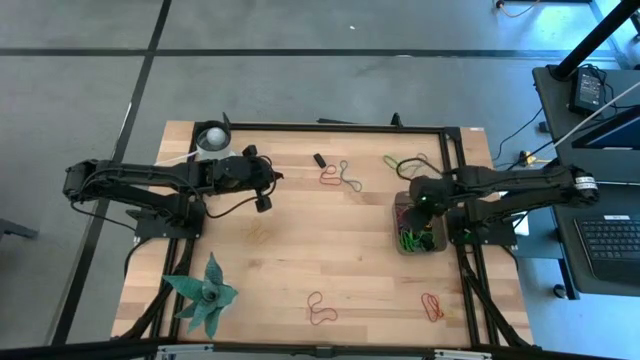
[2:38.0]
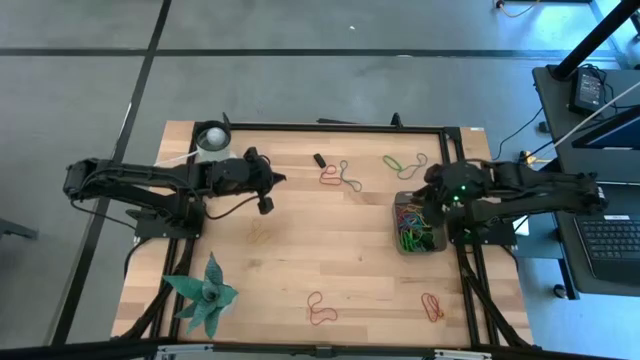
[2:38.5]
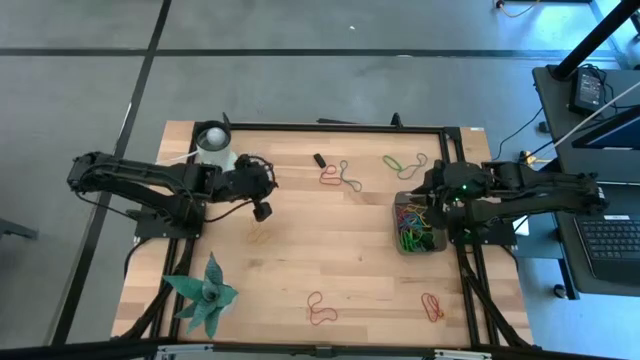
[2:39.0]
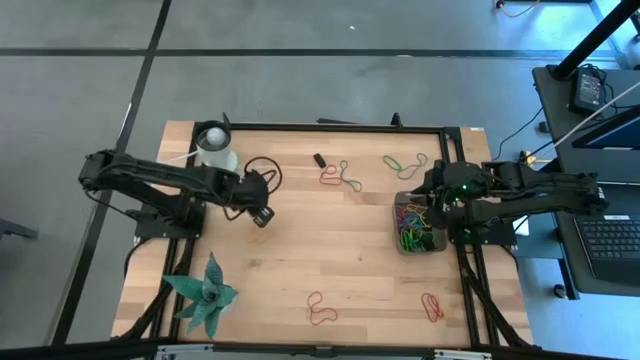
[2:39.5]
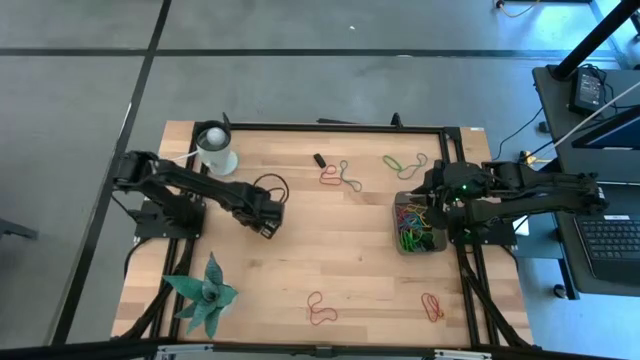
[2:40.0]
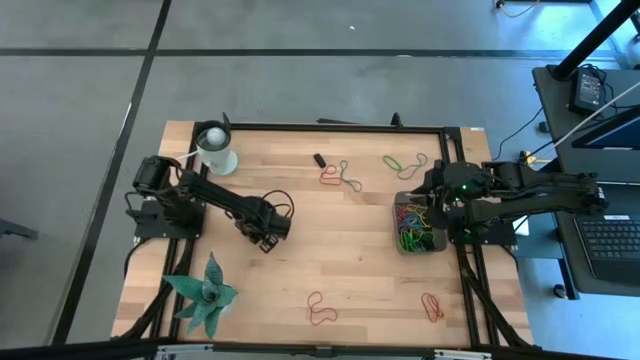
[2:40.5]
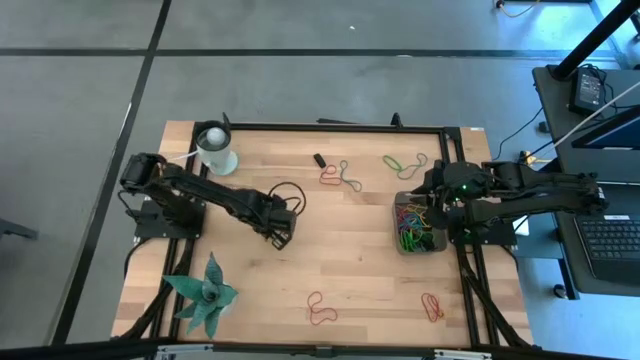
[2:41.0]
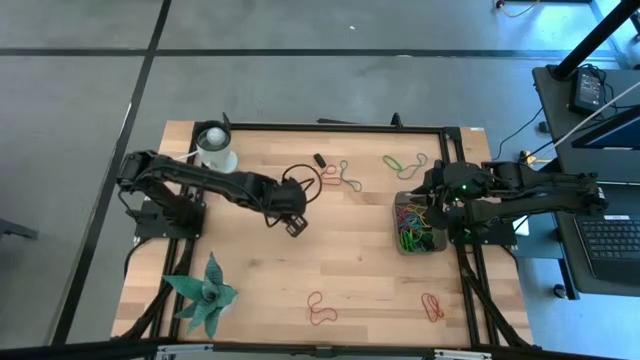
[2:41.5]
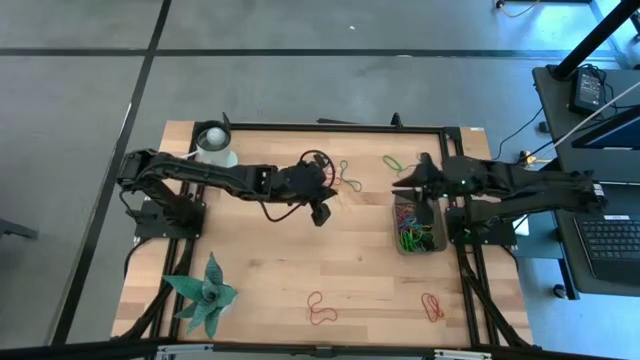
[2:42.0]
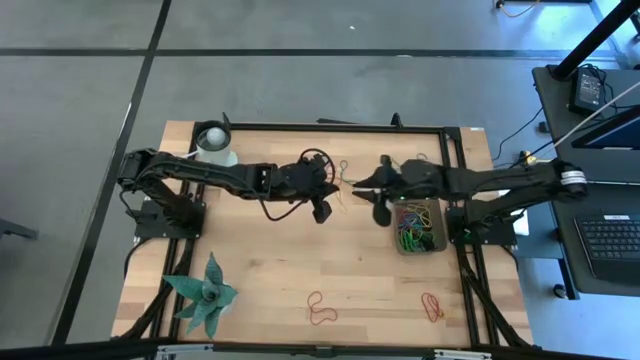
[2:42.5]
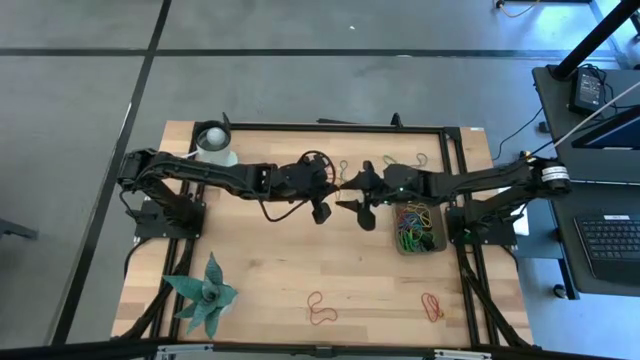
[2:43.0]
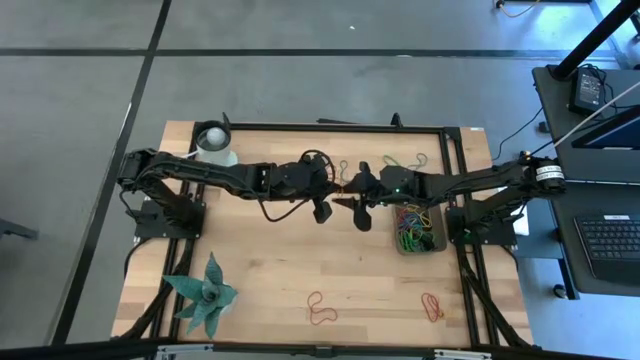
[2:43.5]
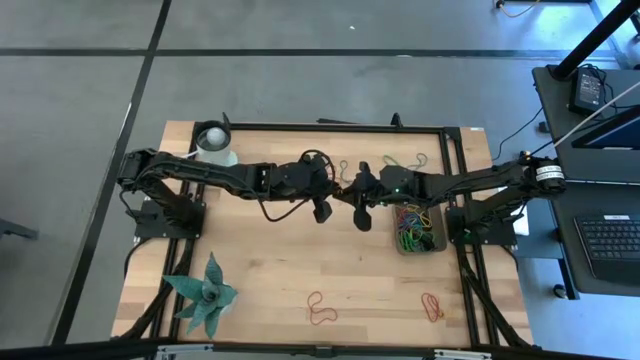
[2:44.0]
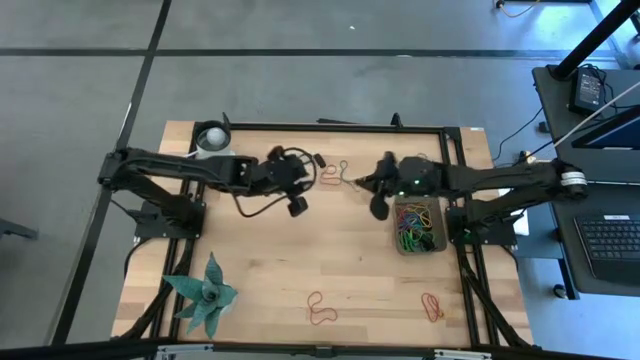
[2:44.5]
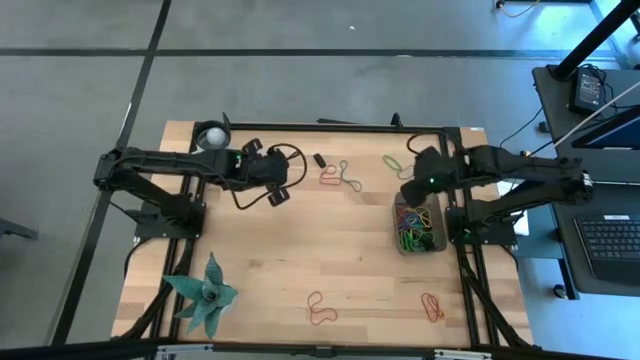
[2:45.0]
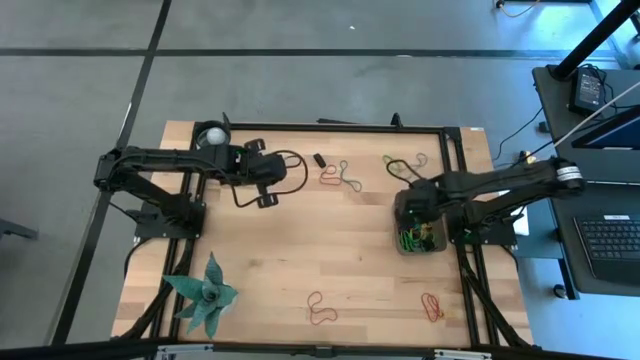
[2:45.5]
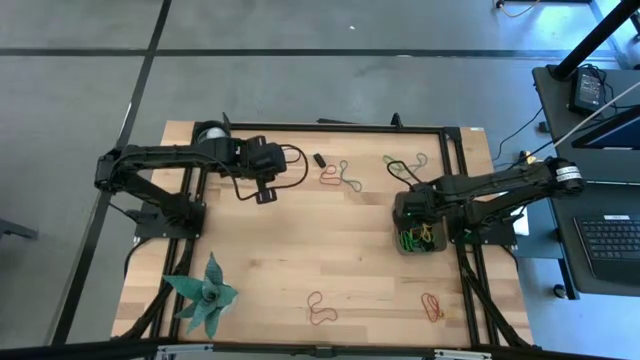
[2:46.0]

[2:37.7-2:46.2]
Task: Pick and place rubber bands into bin
Put the yellow rubber band into the black bin

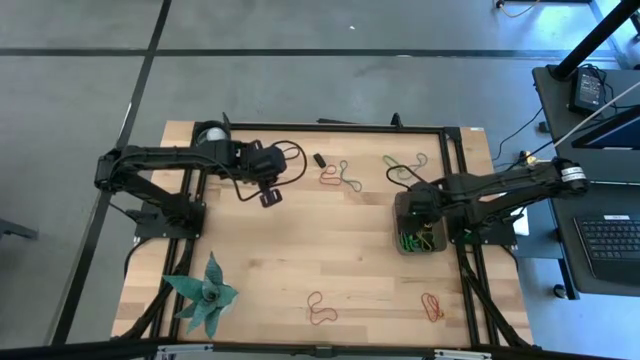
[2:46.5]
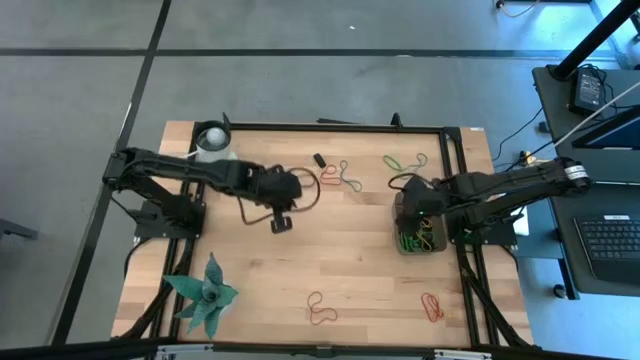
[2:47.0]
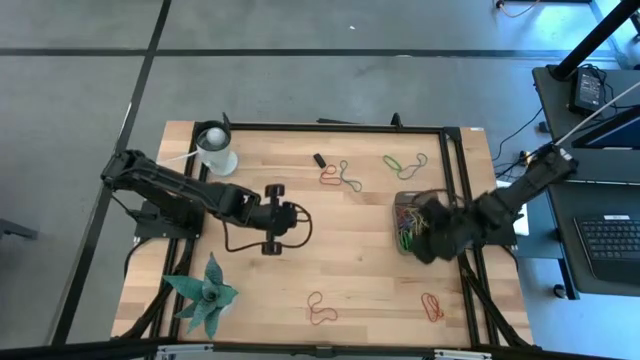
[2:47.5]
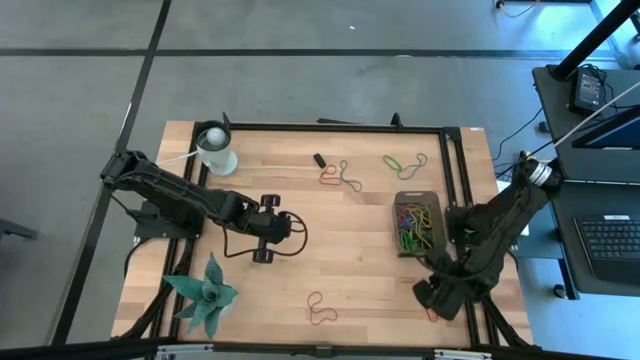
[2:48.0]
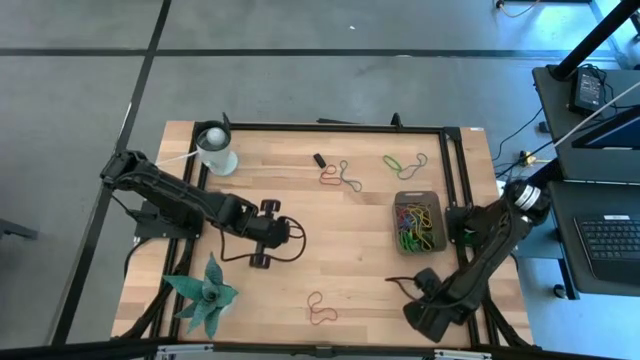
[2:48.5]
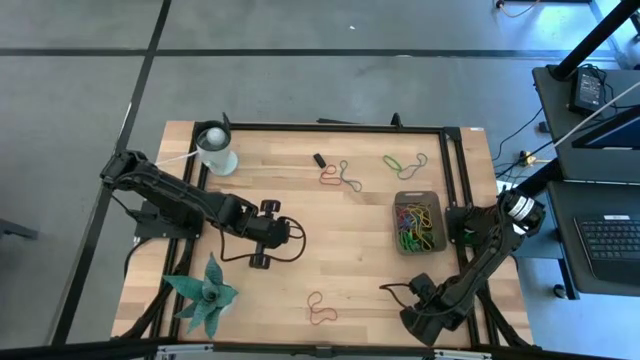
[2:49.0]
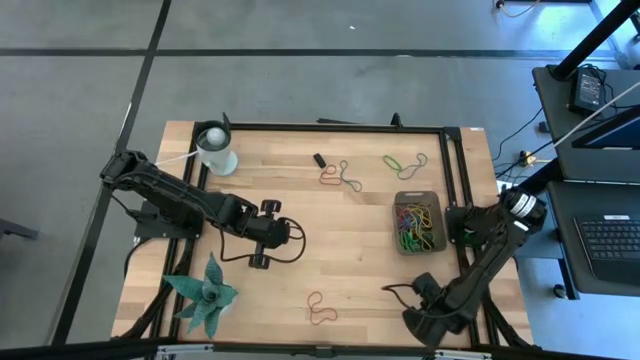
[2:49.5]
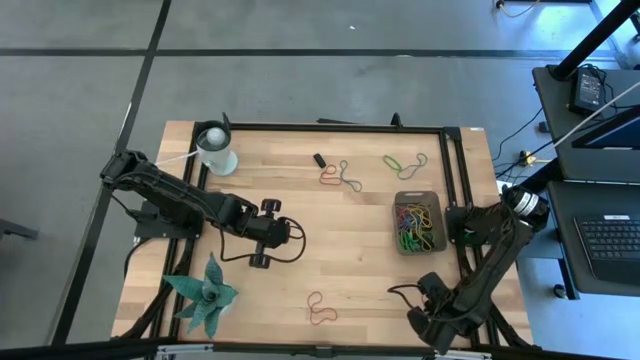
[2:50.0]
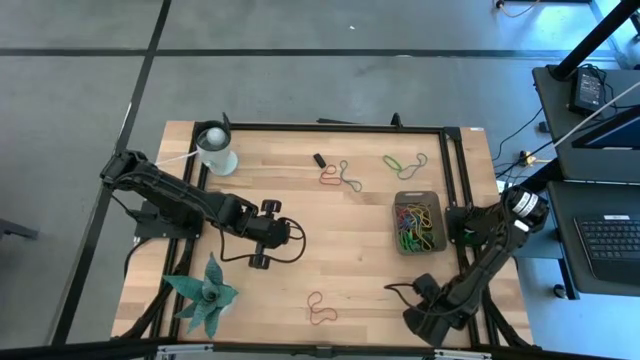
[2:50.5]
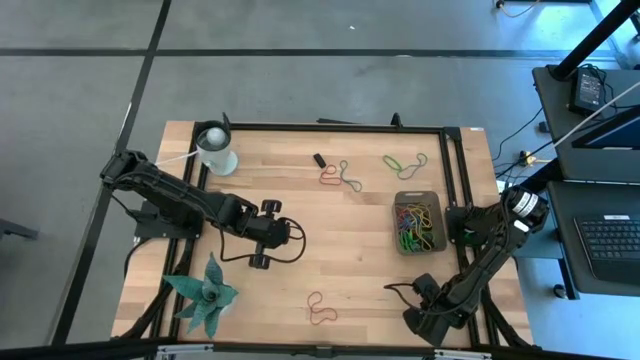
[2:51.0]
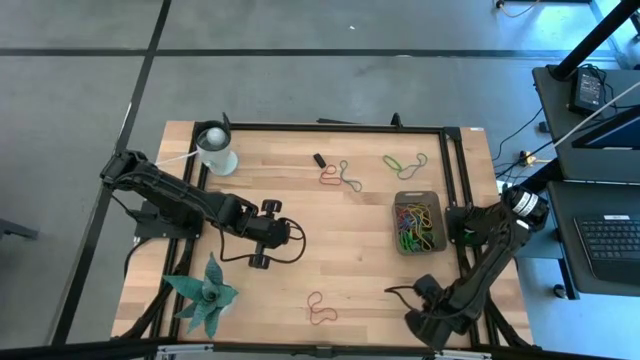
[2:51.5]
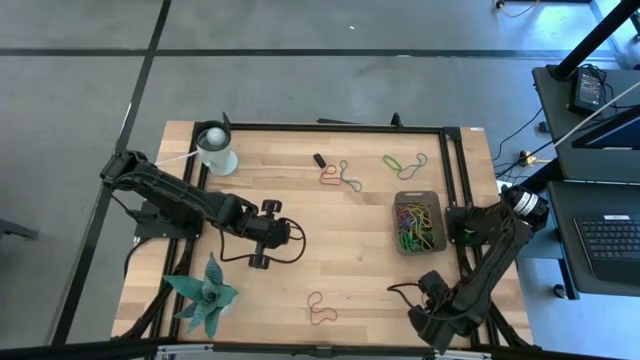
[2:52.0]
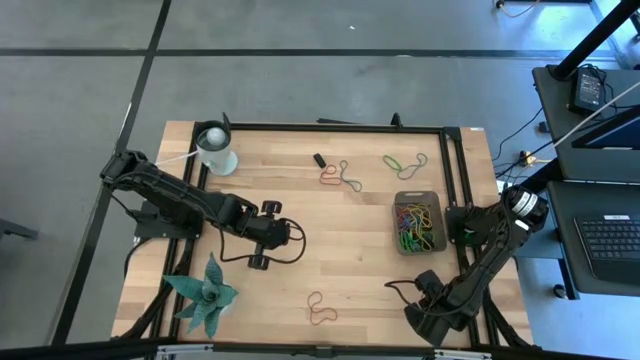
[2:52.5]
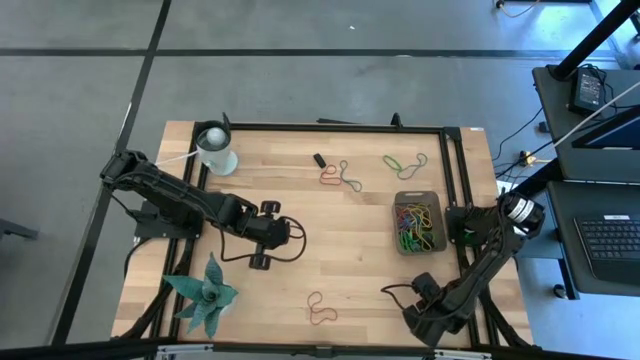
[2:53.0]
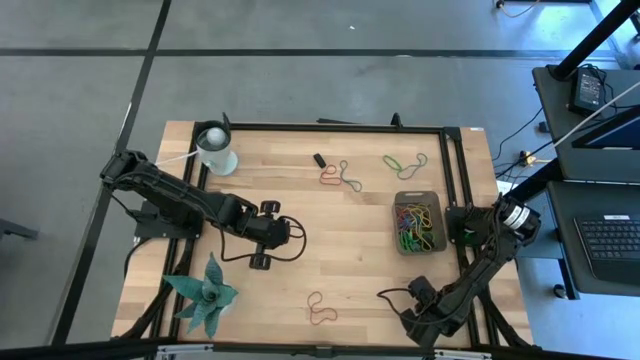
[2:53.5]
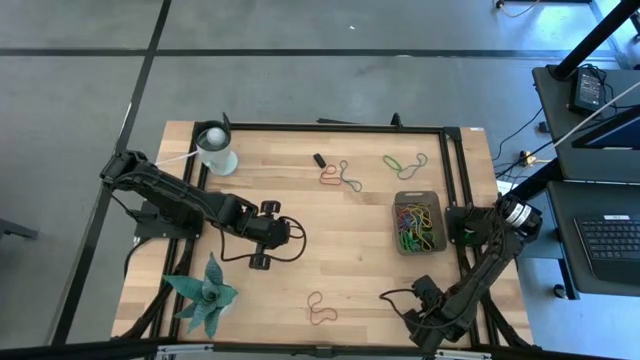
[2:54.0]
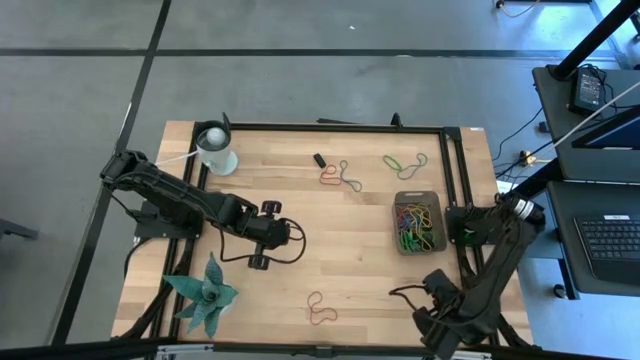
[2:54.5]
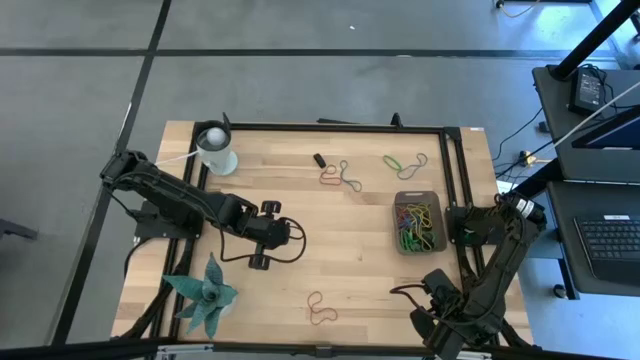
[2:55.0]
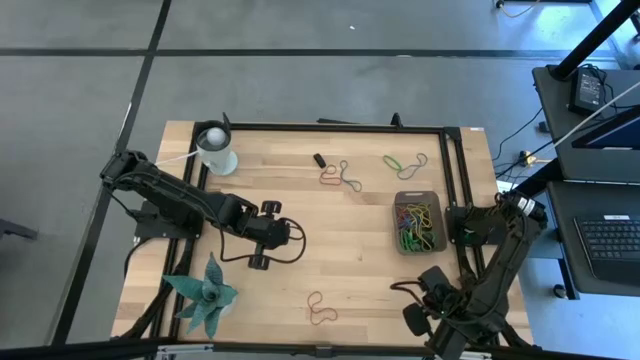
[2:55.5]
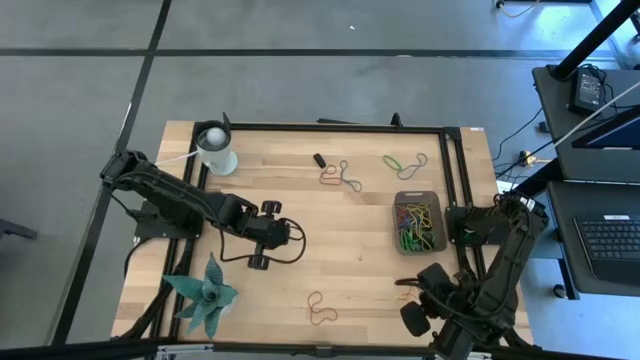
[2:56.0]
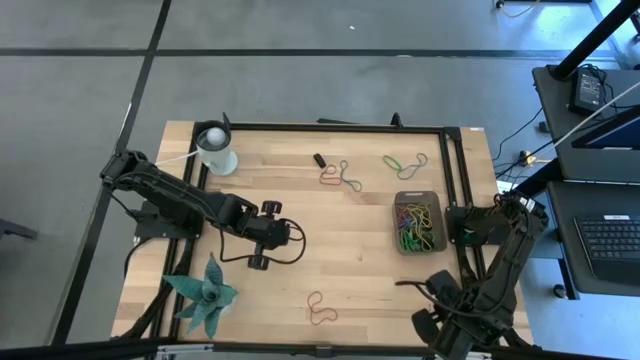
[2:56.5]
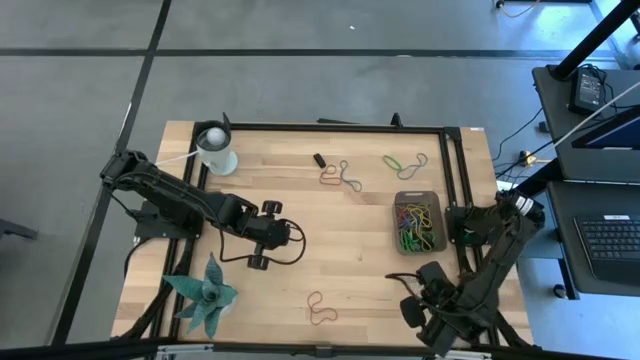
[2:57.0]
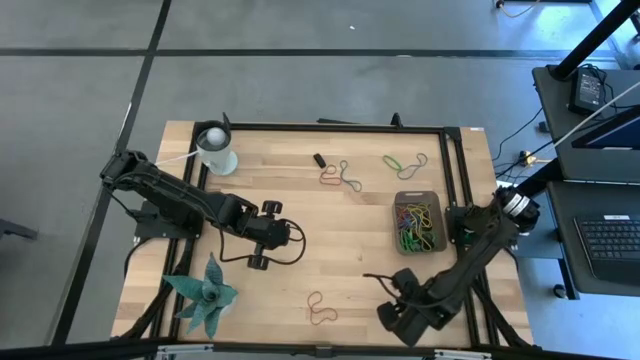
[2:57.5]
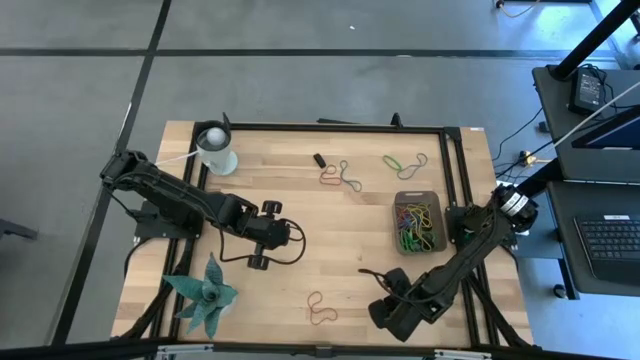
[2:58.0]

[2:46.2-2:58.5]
Put the red rubber band into the black bin
